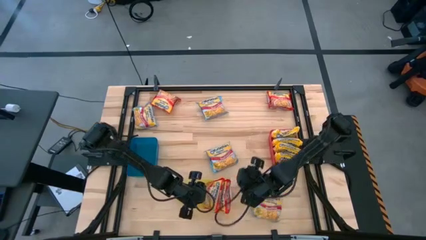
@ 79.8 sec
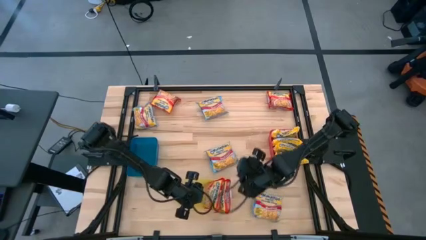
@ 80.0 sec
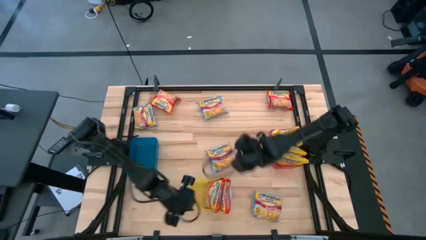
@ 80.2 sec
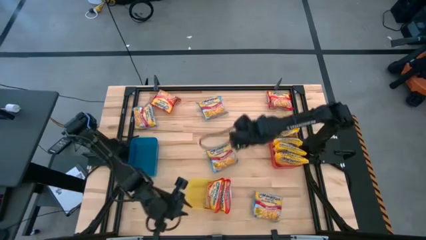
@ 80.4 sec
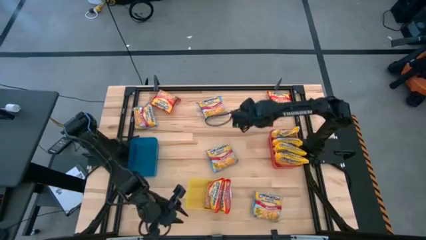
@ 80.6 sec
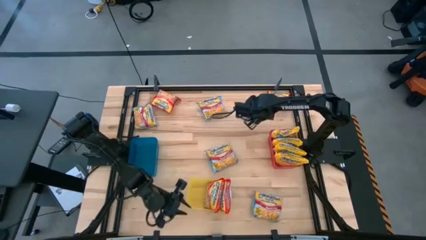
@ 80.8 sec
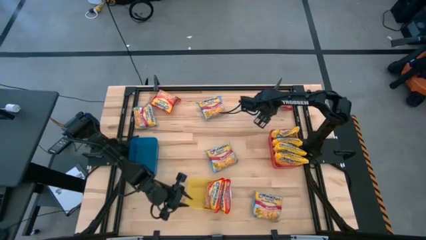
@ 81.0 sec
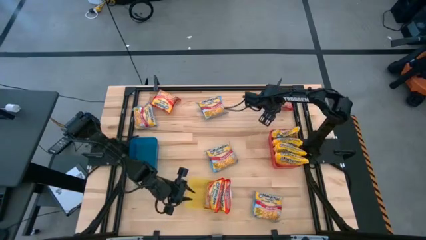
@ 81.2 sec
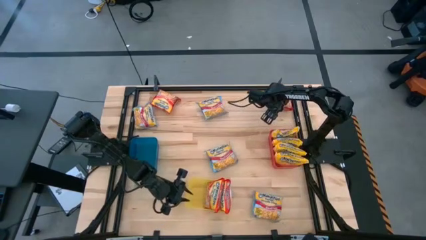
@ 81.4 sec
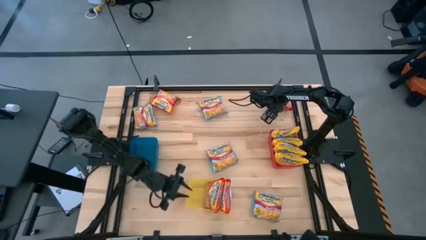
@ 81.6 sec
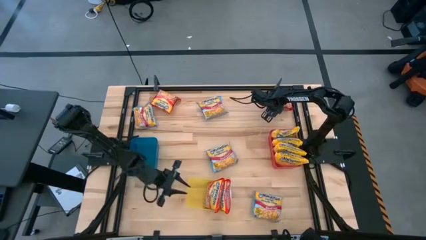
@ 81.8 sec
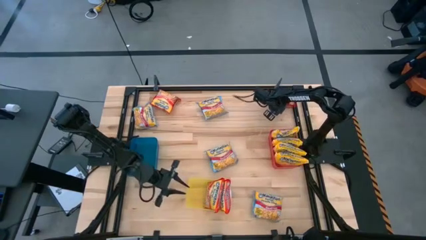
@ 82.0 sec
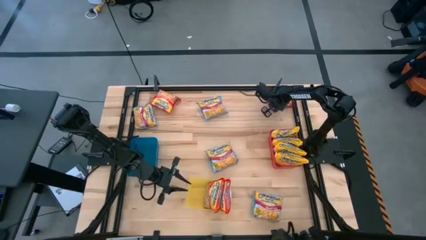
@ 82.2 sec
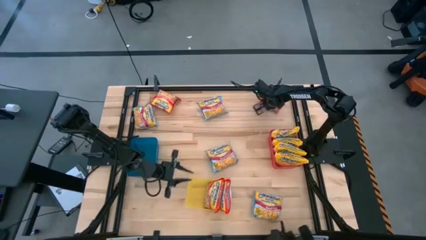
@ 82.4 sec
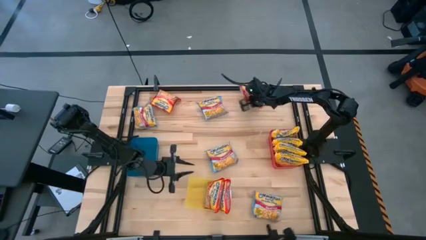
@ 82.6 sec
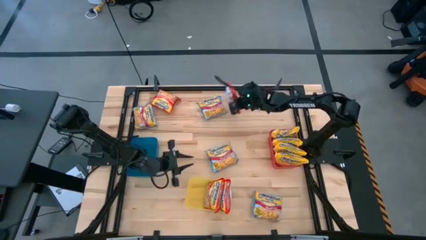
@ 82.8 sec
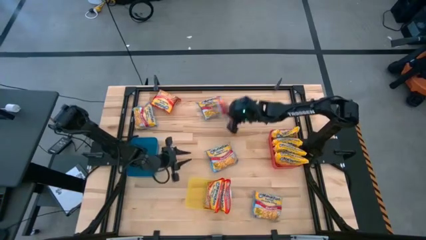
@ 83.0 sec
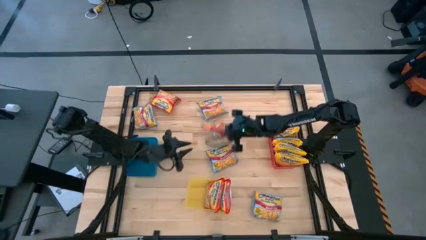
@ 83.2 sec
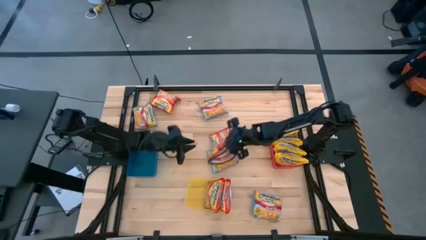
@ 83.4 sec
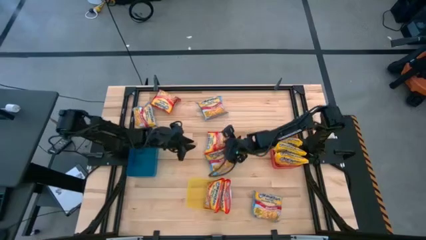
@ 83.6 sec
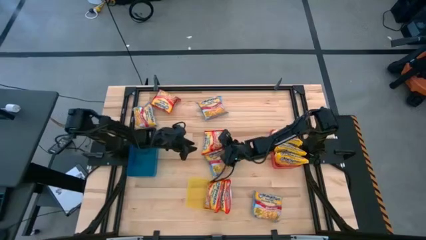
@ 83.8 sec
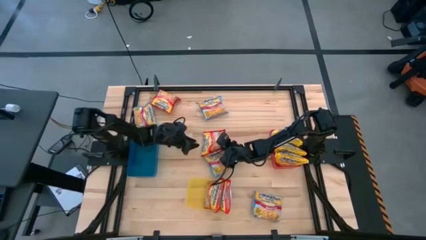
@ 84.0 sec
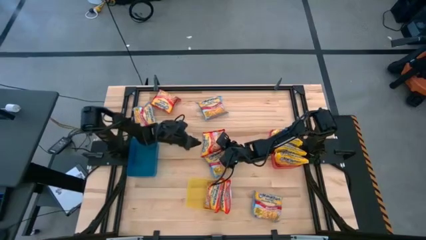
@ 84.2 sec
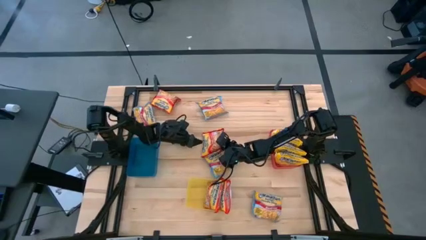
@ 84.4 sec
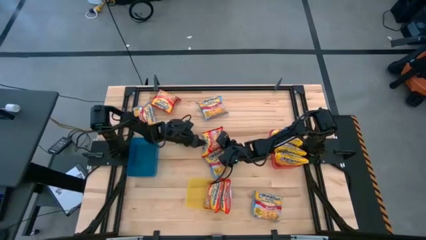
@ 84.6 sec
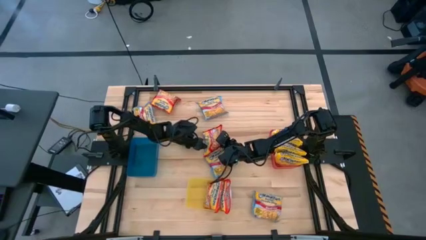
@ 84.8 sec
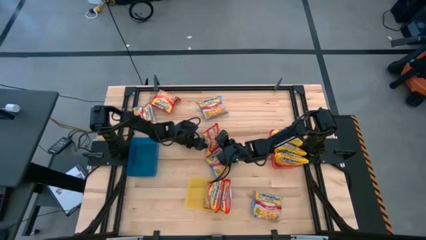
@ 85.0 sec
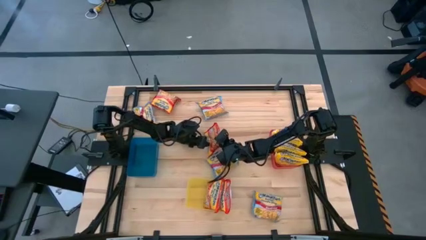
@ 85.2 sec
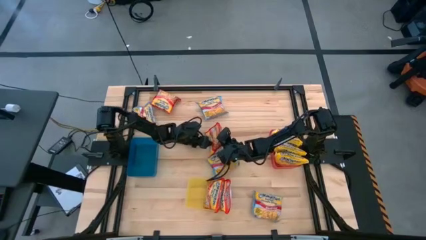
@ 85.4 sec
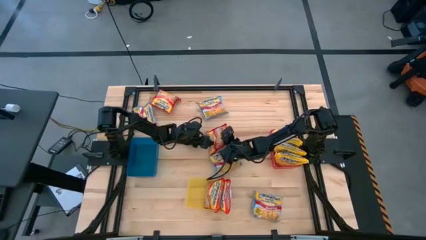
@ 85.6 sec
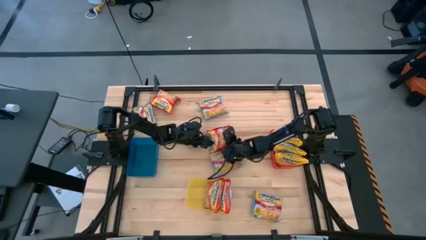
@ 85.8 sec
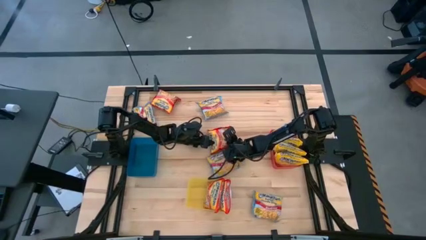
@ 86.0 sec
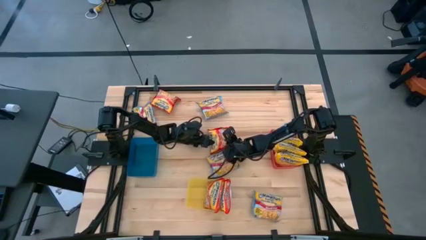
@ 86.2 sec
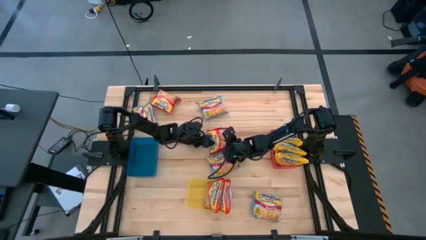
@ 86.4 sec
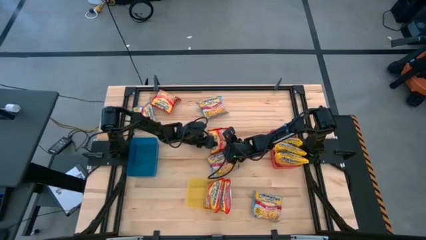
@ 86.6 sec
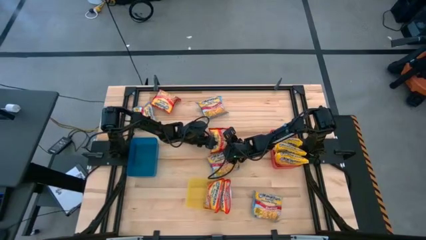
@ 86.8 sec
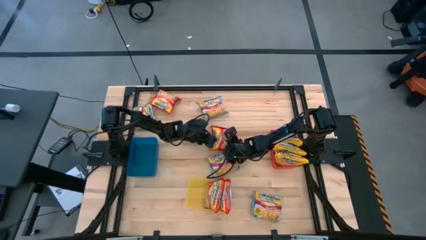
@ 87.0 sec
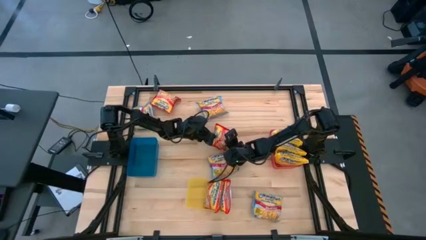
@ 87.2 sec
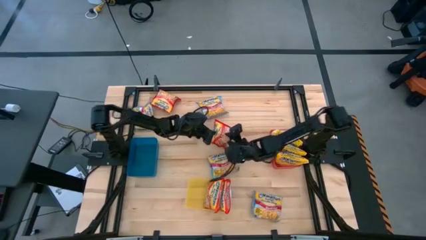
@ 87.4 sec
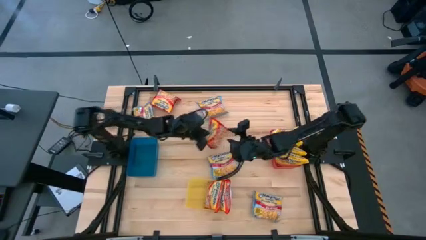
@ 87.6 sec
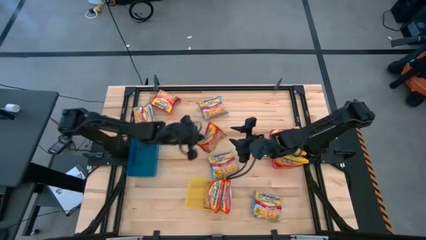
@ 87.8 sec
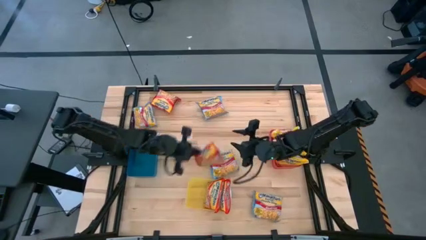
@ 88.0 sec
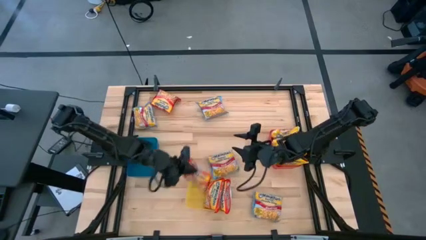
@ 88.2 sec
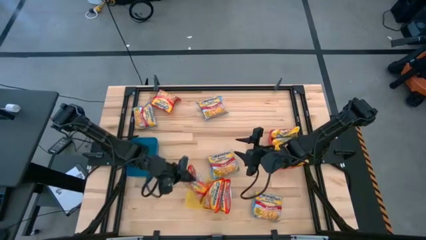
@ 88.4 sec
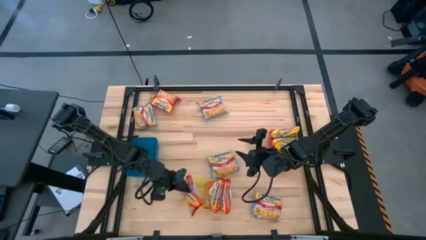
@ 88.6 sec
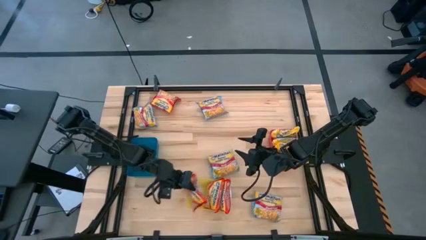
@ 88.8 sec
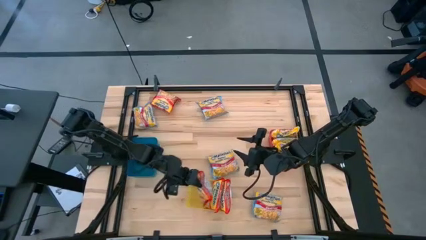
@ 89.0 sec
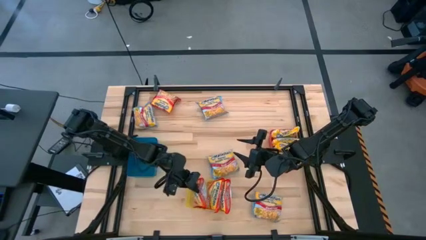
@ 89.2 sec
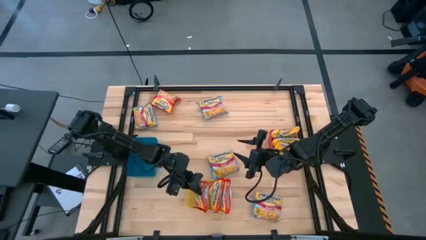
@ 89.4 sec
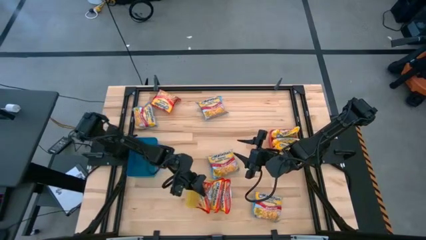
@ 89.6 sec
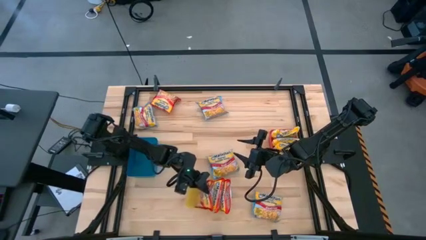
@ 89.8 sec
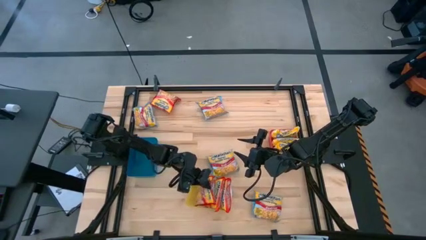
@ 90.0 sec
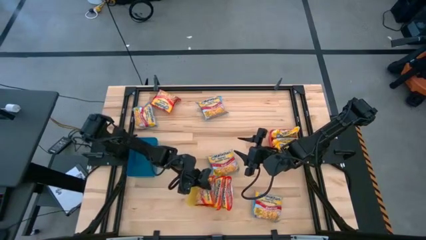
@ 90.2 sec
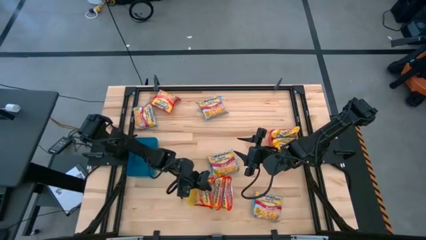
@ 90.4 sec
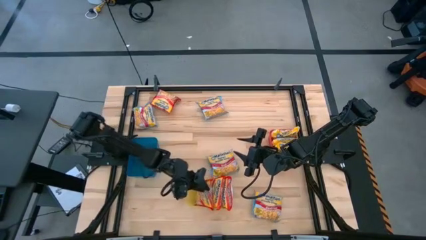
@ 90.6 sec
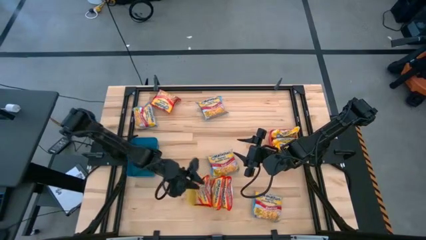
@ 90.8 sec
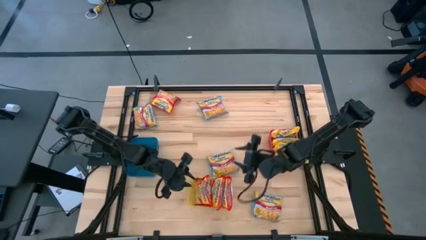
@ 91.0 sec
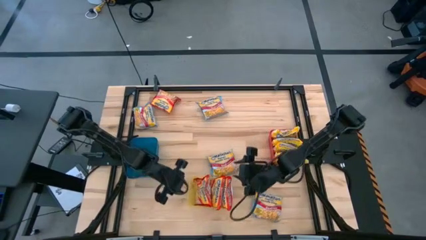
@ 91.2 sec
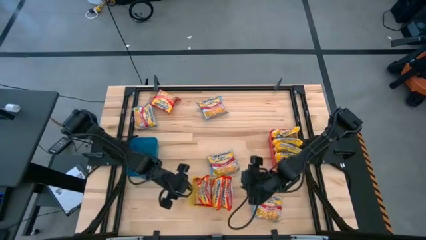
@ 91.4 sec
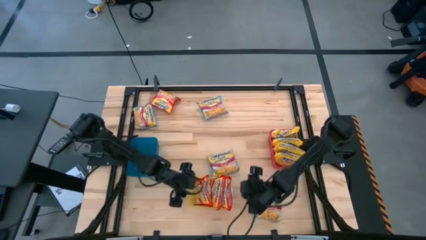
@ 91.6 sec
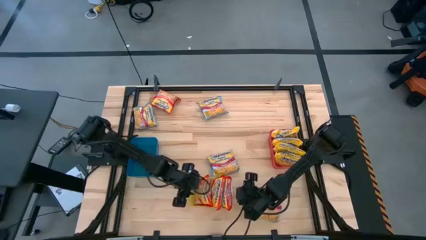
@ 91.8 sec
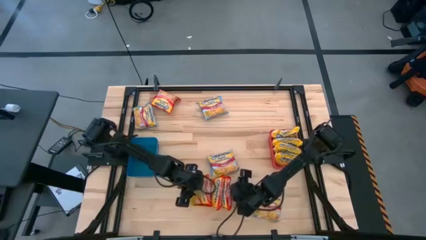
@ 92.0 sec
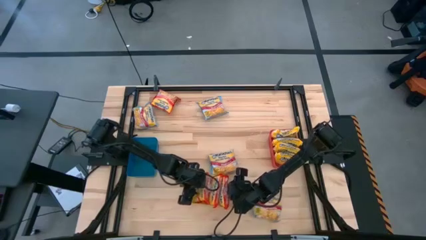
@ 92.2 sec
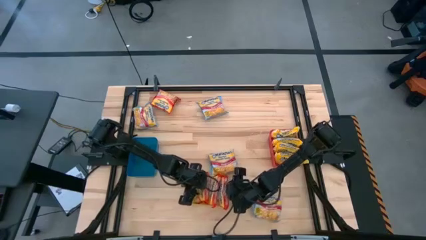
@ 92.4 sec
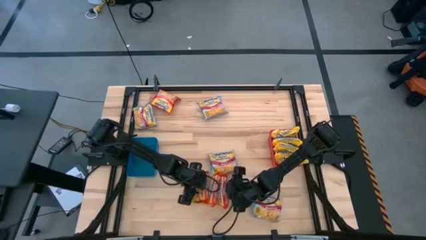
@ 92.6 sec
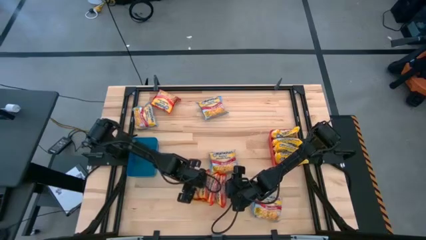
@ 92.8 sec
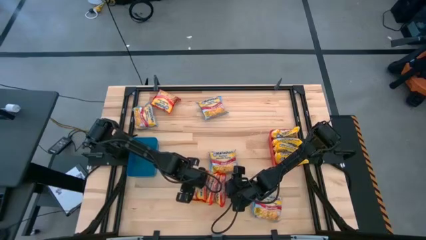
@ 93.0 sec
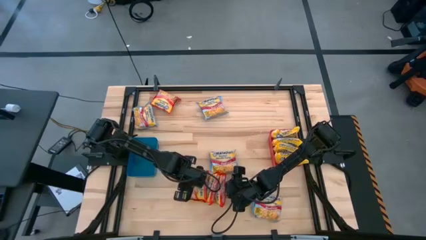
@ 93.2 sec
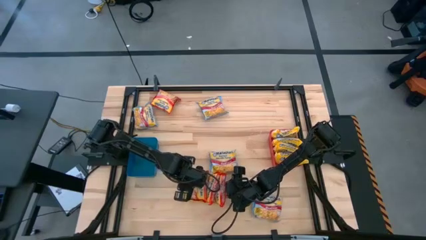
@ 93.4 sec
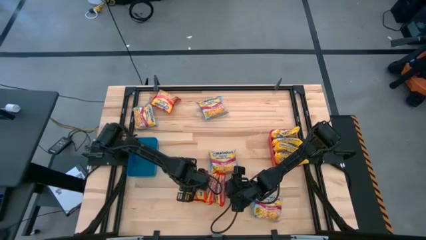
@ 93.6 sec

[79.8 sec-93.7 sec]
Task: Sort Maruchan noodles
Put the red noodle pack into the yellow bin
